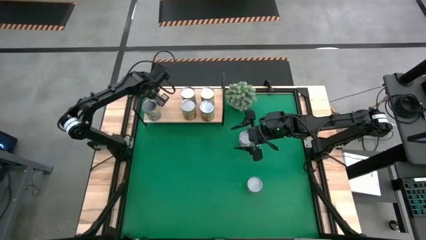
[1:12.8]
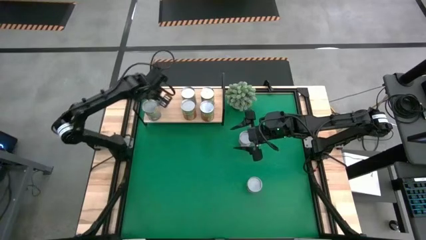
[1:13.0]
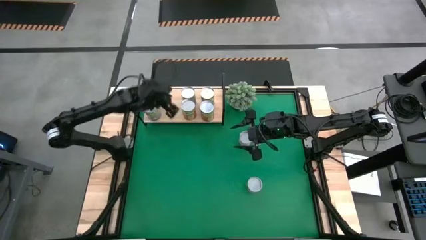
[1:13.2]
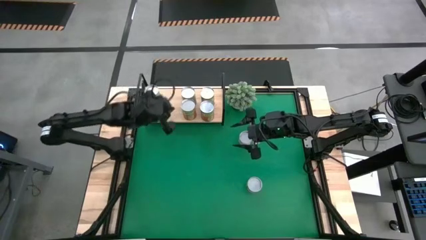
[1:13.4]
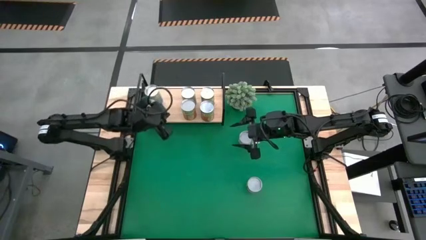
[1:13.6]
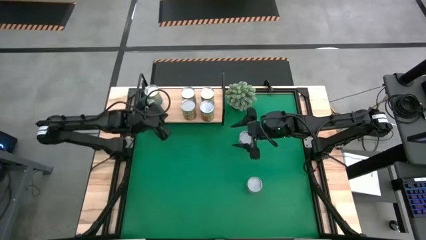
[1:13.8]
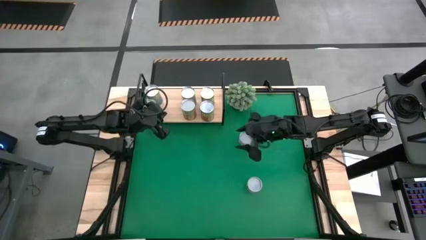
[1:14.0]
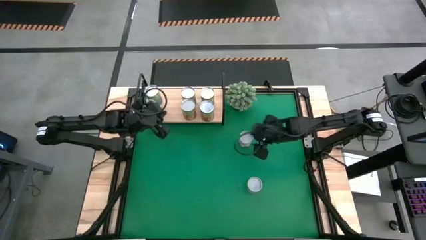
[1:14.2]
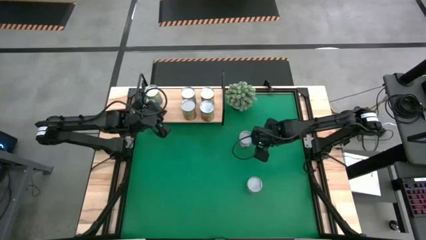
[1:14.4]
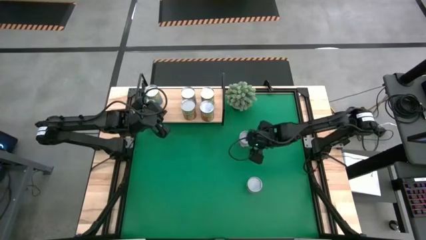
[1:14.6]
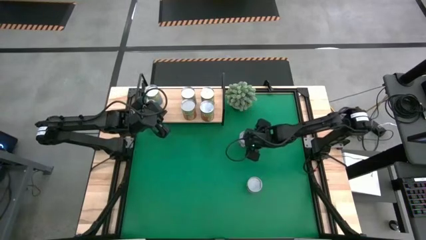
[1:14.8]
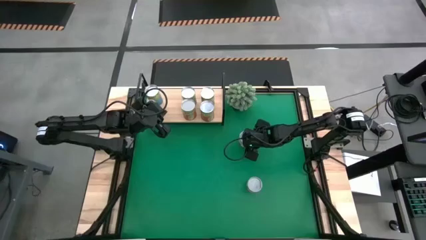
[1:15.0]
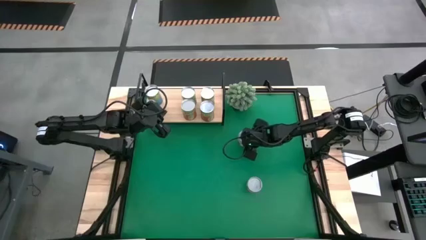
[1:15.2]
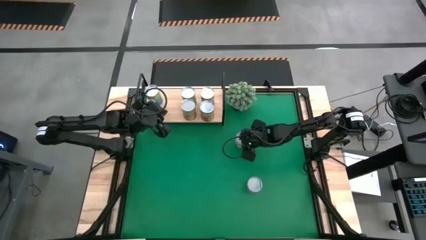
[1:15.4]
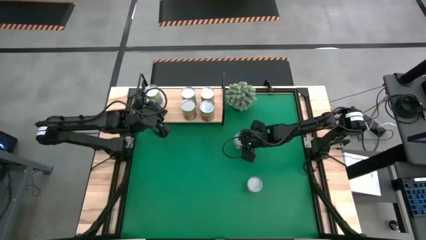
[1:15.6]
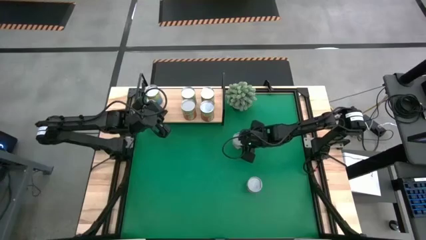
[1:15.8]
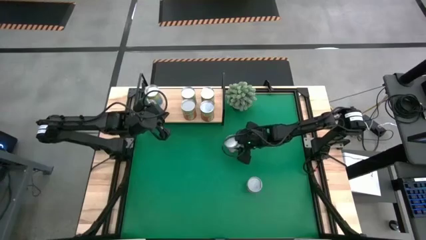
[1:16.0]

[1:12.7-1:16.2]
Task: Pick and place cans onto a shelf
Put the canned spaghetti sauce on the shelf

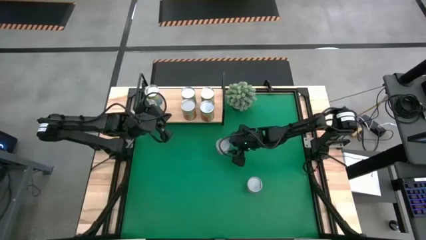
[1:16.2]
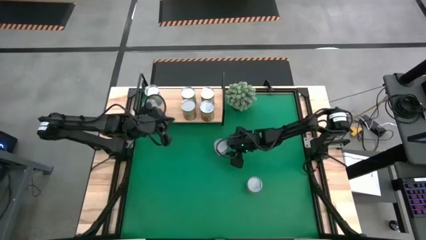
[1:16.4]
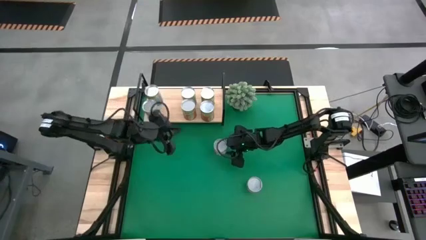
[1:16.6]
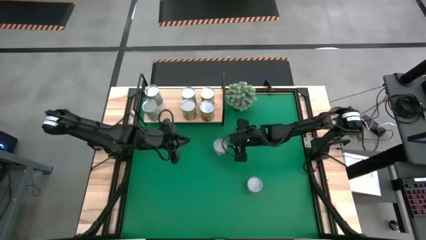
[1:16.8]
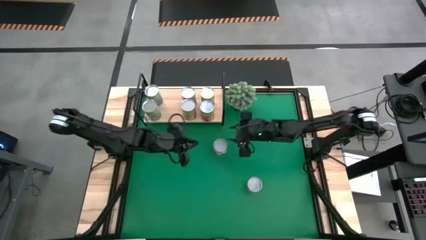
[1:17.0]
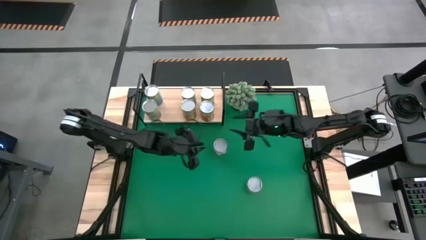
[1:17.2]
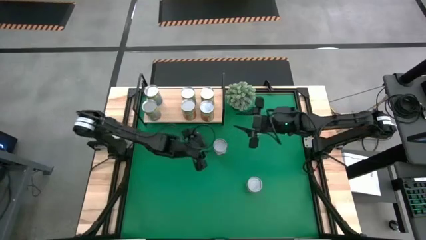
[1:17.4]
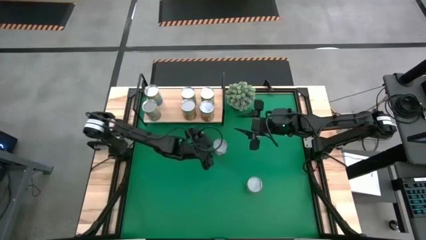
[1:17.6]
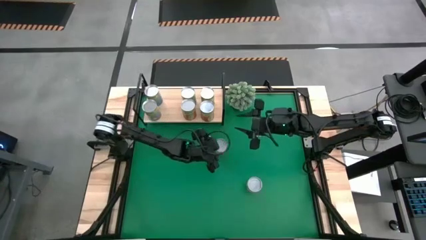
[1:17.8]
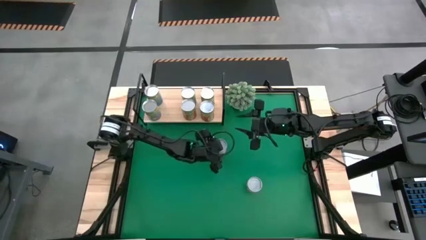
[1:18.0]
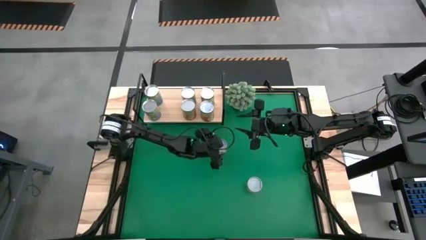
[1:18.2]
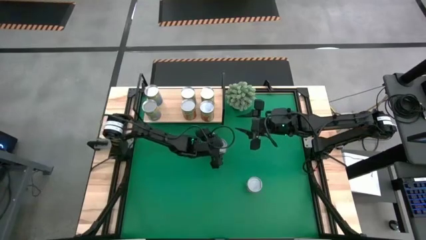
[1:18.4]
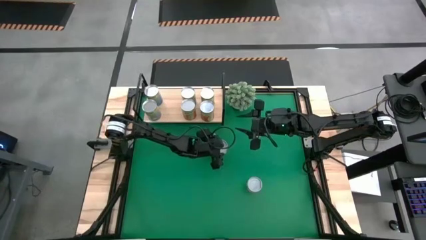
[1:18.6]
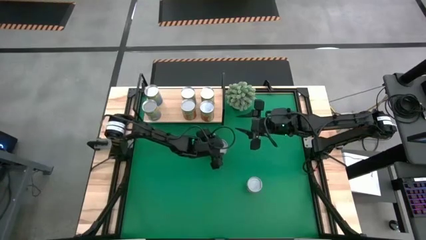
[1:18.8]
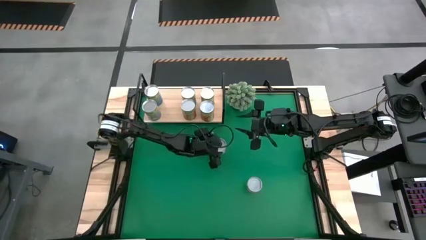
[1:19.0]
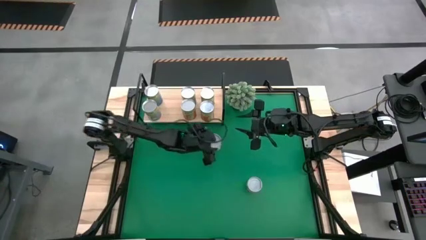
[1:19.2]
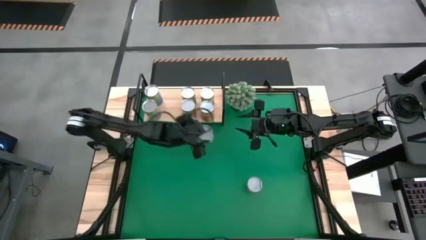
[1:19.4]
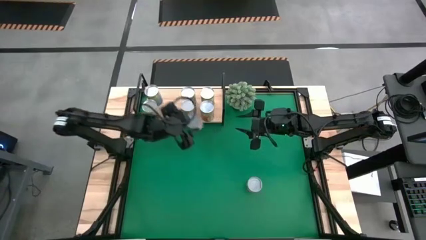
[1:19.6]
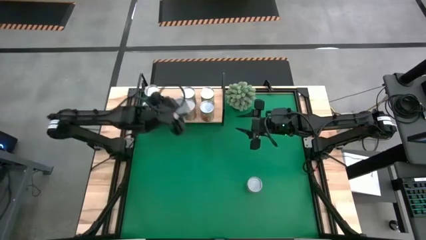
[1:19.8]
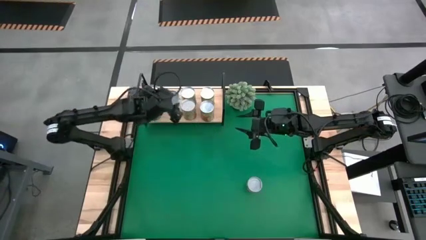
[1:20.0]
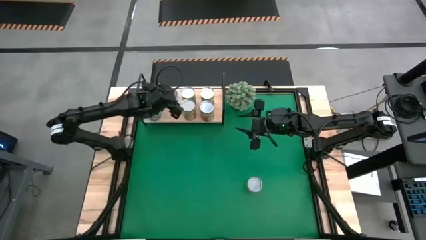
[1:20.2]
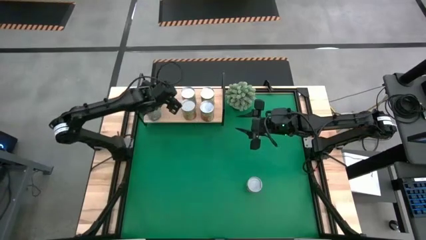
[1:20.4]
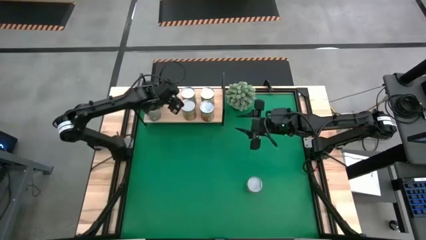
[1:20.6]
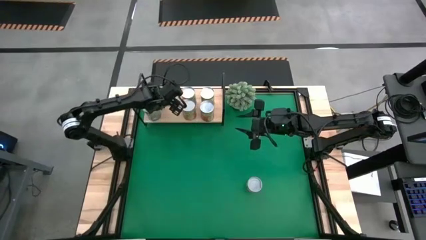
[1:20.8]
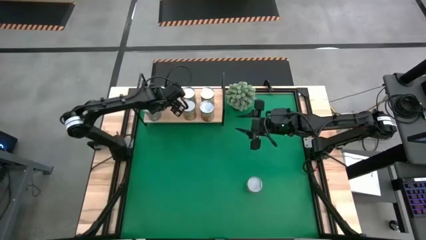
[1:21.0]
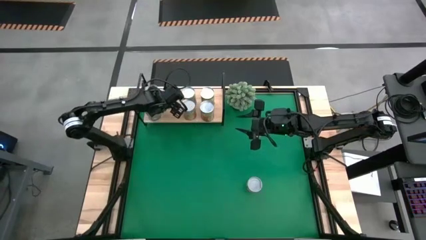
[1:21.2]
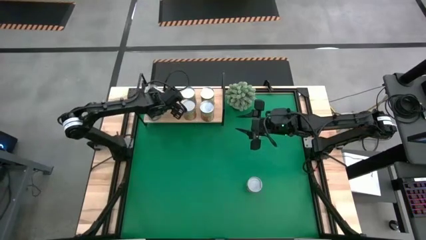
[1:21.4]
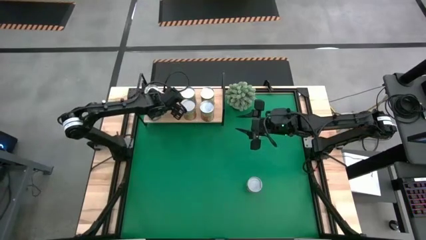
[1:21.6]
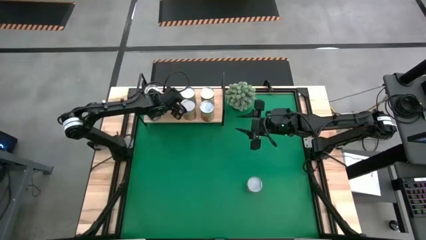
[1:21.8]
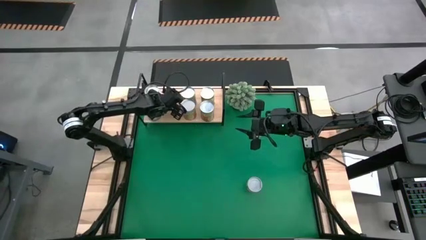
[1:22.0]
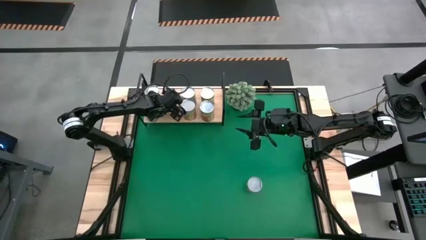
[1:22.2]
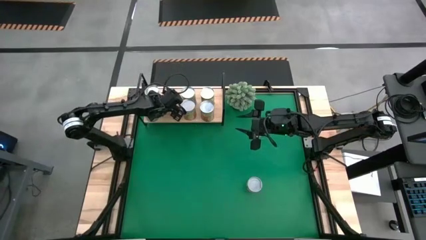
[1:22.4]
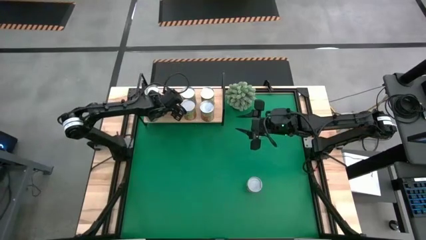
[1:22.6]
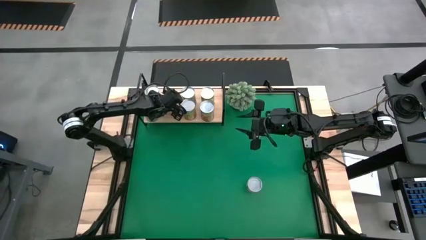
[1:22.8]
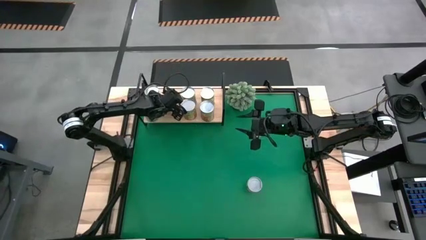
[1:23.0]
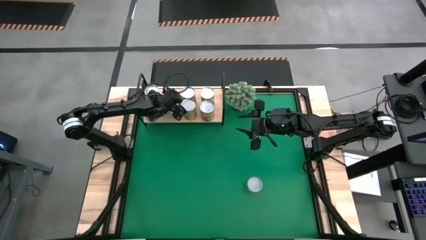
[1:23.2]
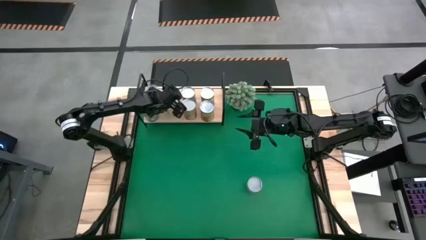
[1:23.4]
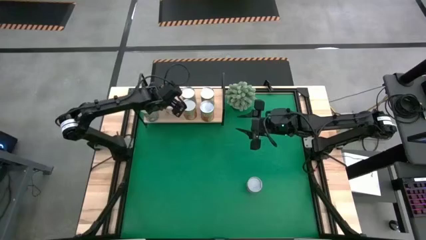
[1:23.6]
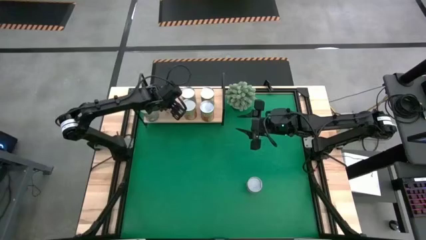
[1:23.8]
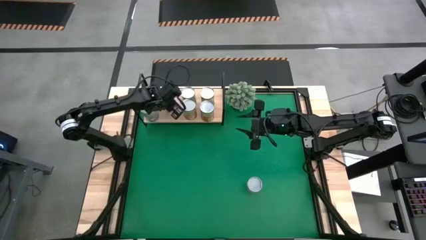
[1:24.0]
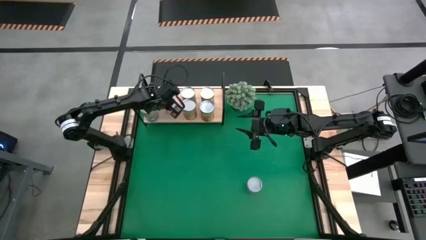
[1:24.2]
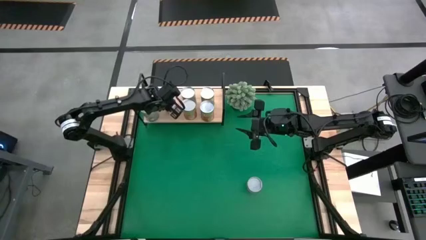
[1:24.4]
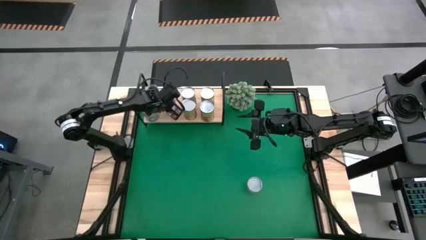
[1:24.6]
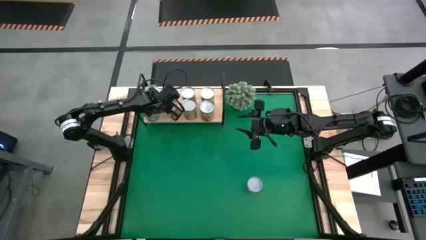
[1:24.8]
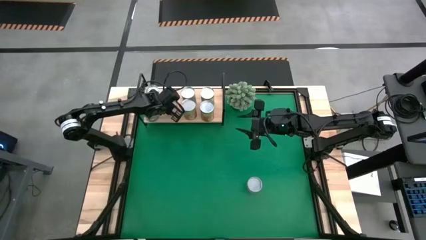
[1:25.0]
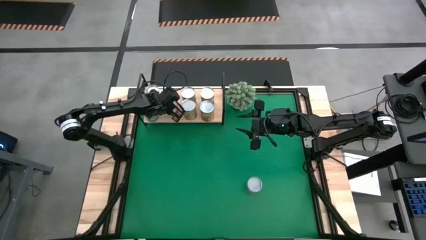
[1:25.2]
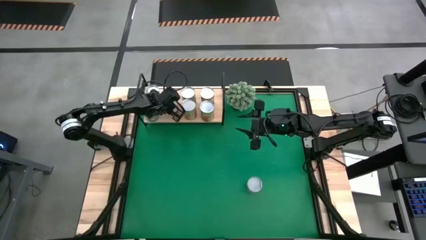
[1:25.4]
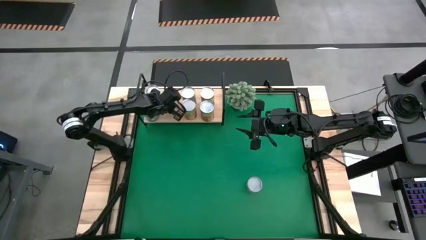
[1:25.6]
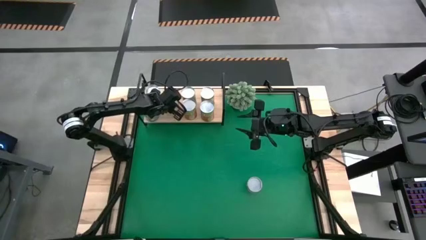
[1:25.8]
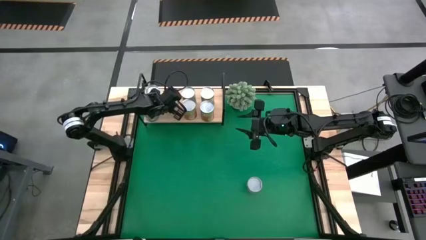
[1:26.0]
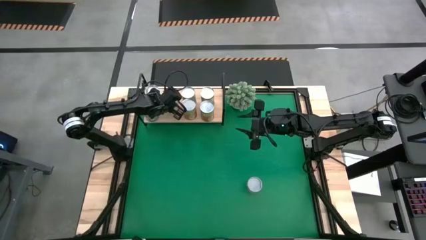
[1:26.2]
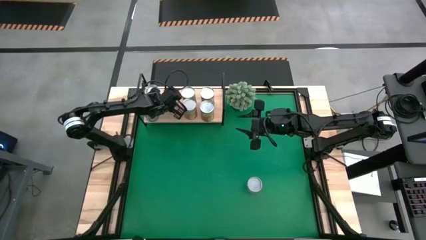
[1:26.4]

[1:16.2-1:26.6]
Put the canned spaghetti sauce on the shelf

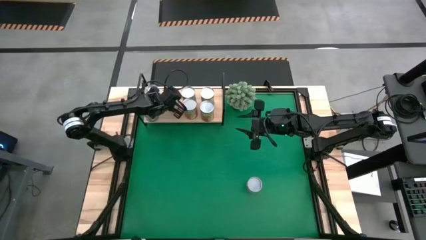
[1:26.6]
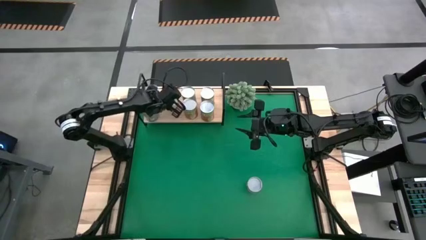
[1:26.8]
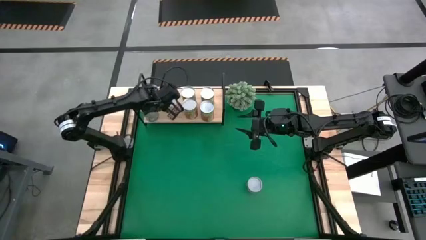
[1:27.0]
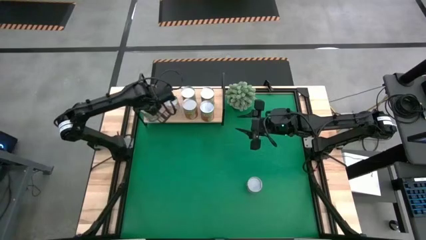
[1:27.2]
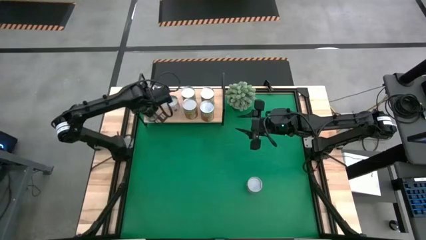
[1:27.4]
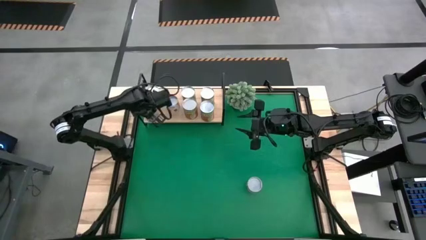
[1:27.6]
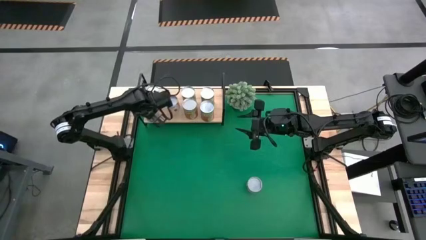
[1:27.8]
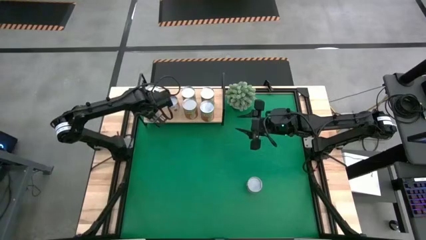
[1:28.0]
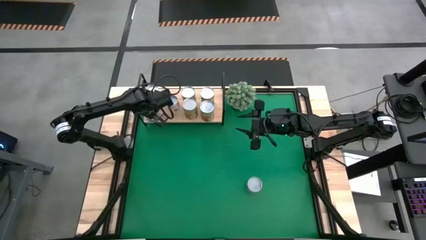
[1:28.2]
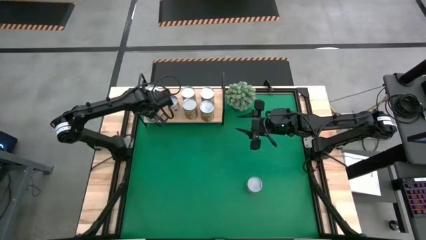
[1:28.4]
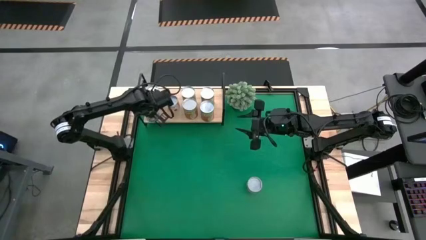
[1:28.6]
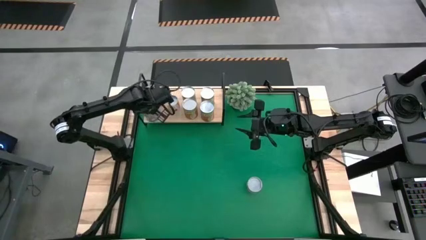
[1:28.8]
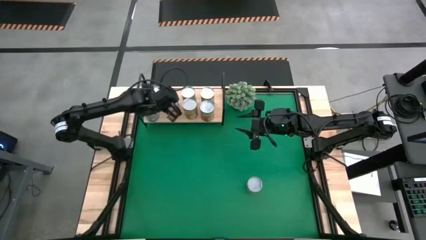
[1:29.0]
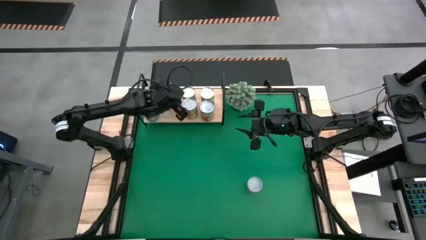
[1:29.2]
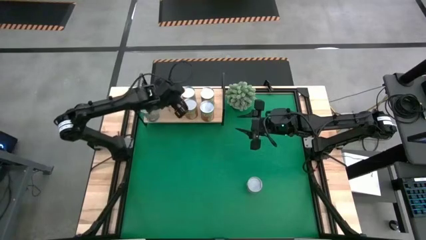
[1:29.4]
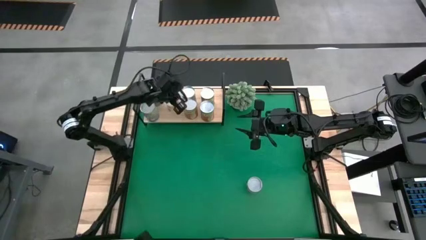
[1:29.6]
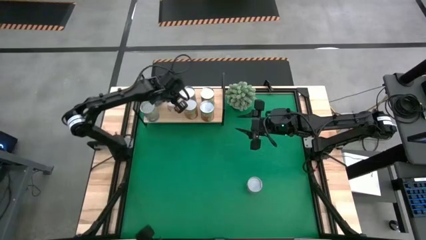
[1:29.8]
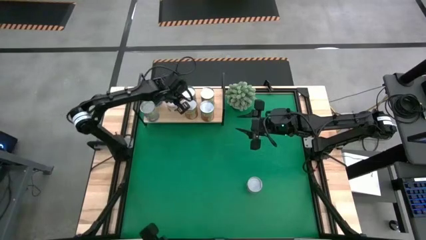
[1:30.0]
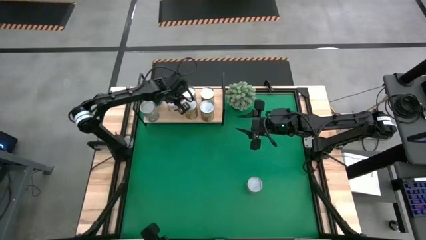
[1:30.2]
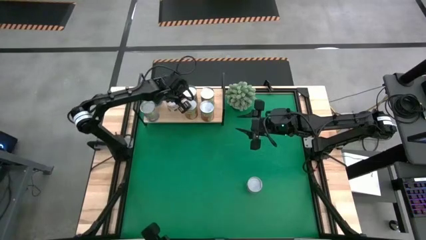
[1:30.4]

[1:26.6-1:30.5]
Adjust the canned goods on the shelf
